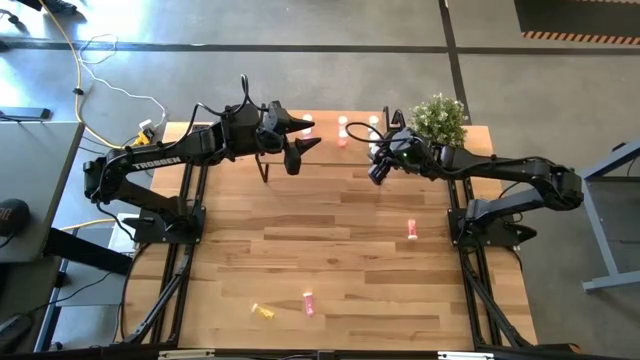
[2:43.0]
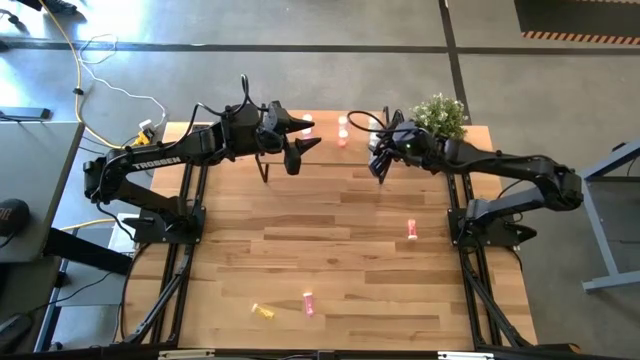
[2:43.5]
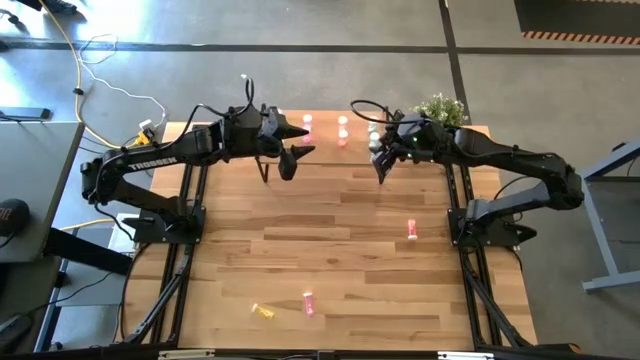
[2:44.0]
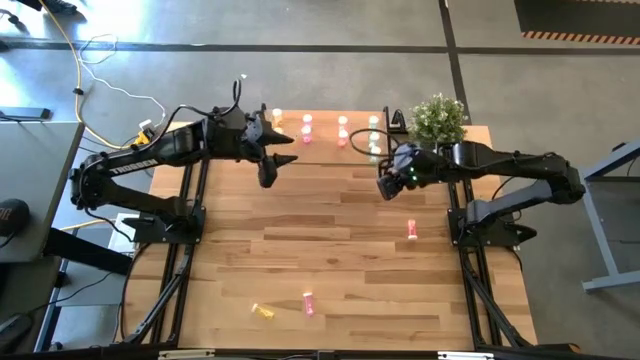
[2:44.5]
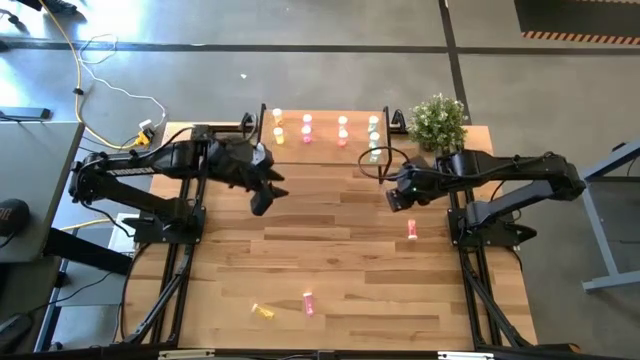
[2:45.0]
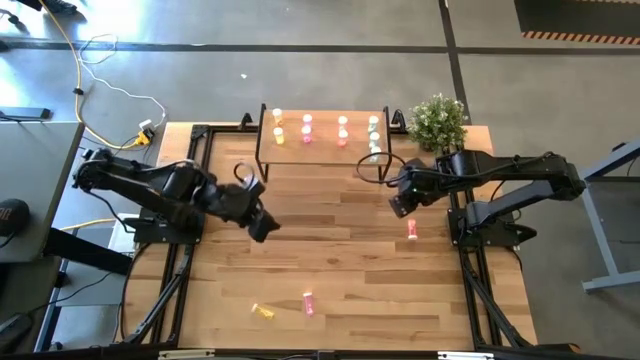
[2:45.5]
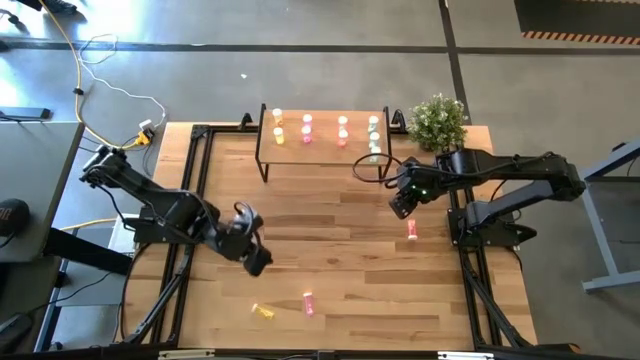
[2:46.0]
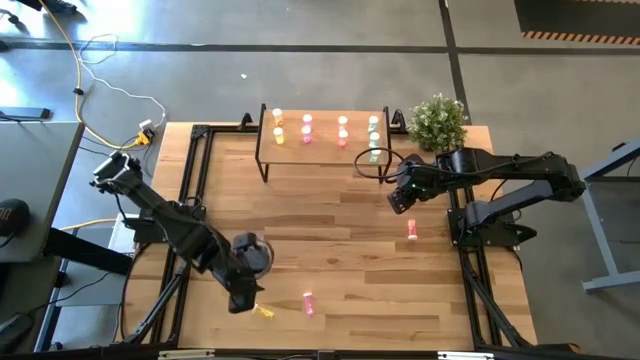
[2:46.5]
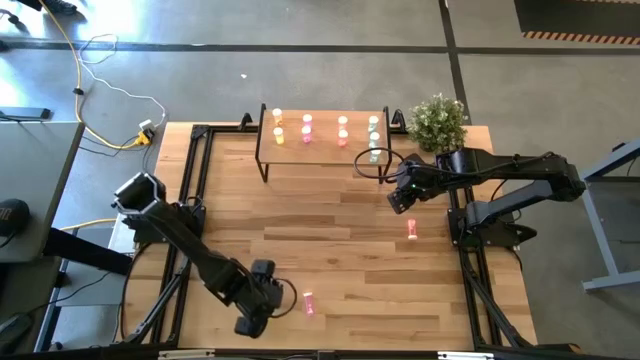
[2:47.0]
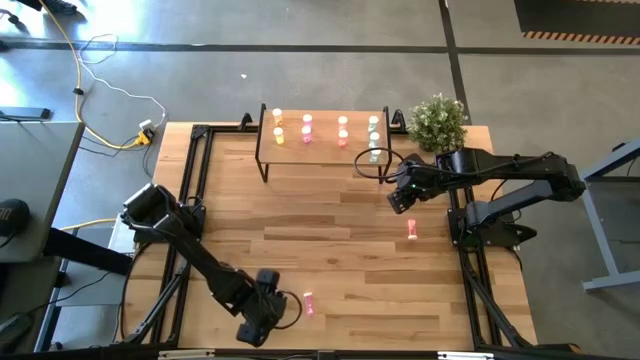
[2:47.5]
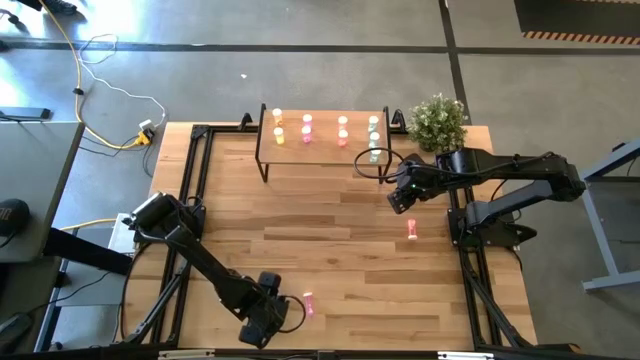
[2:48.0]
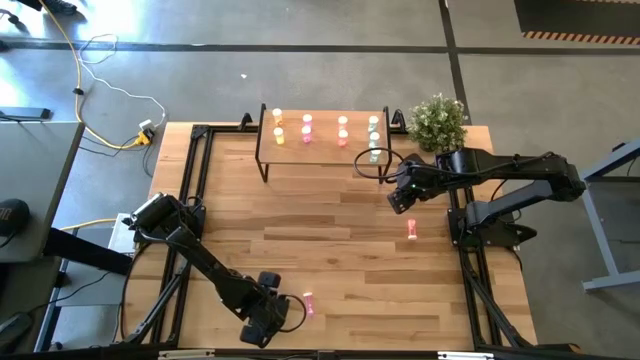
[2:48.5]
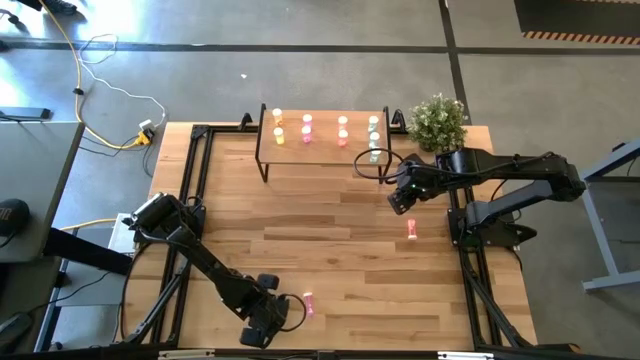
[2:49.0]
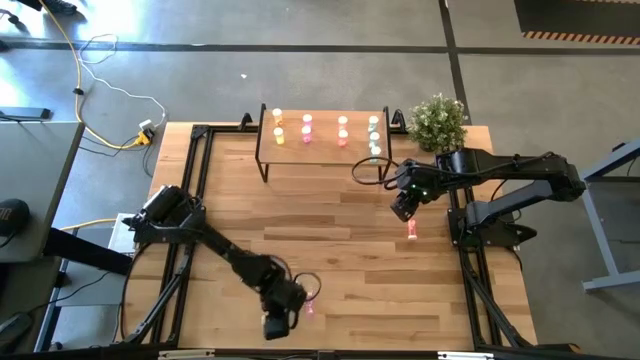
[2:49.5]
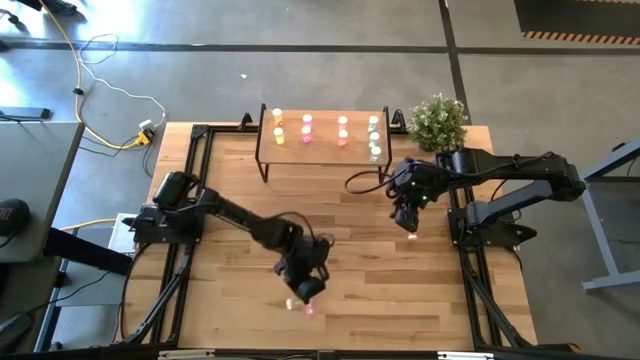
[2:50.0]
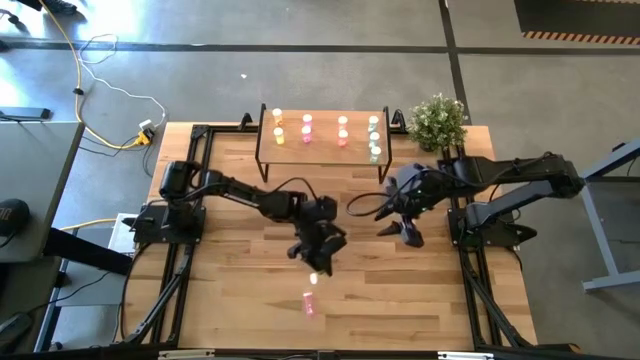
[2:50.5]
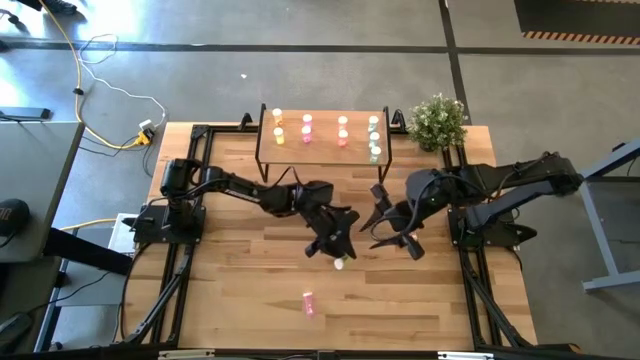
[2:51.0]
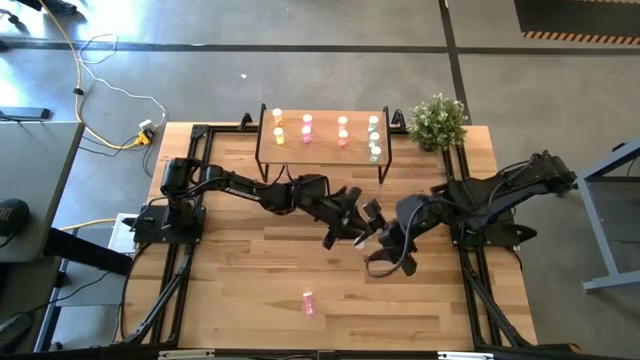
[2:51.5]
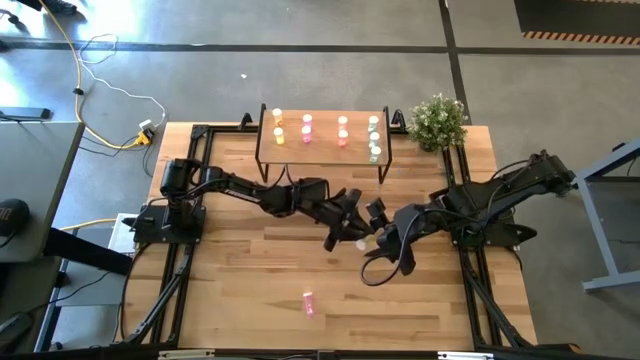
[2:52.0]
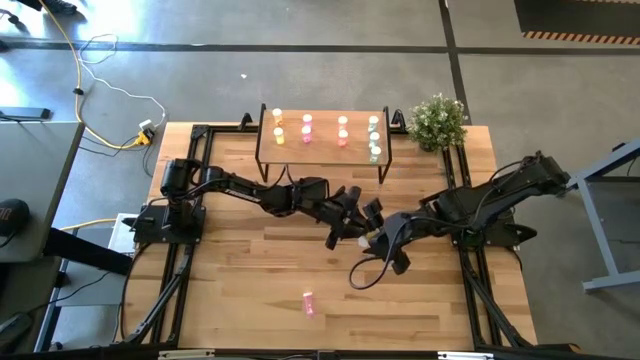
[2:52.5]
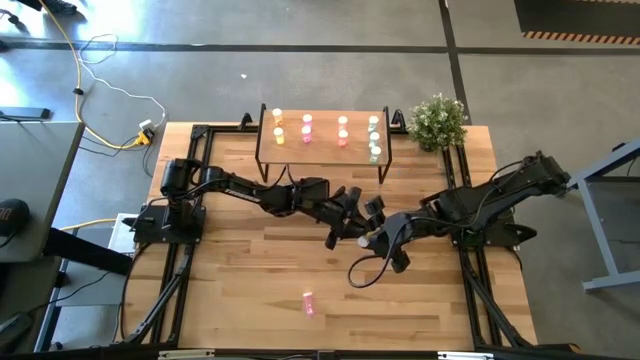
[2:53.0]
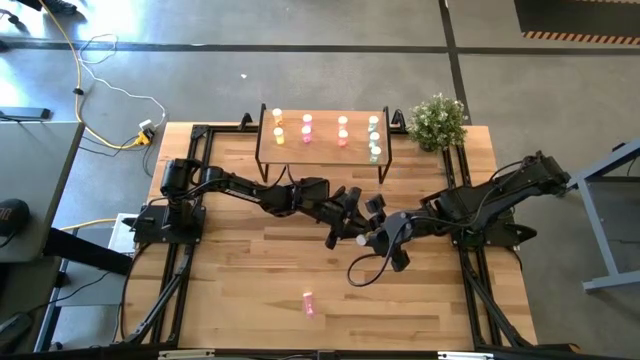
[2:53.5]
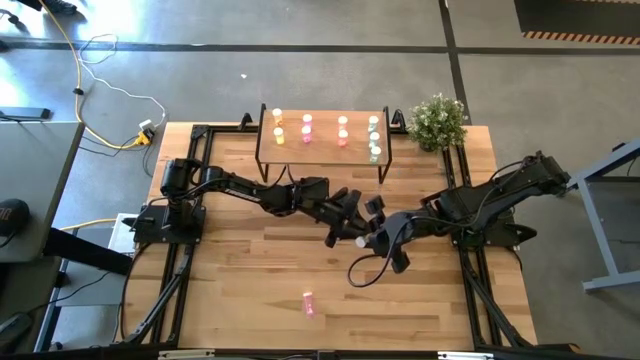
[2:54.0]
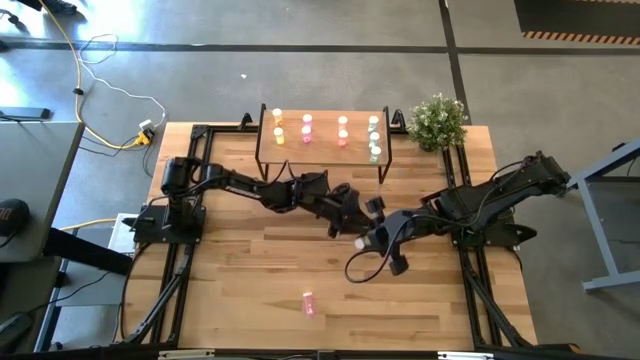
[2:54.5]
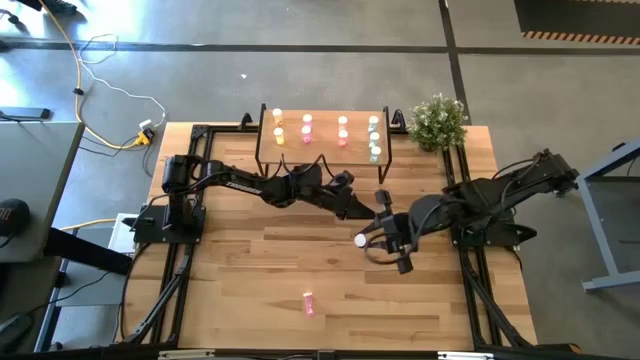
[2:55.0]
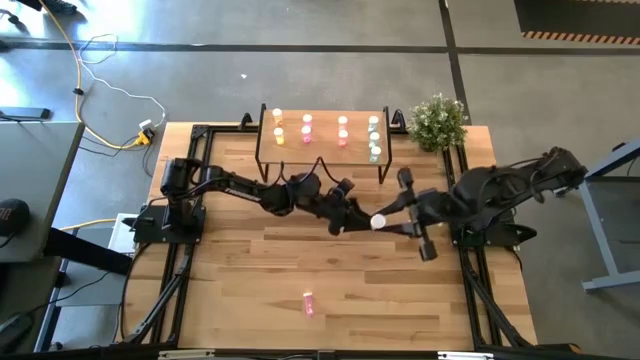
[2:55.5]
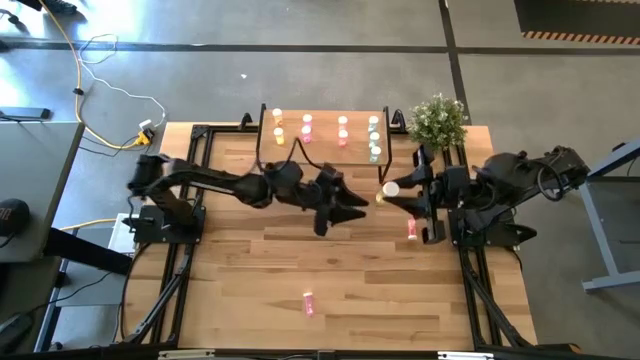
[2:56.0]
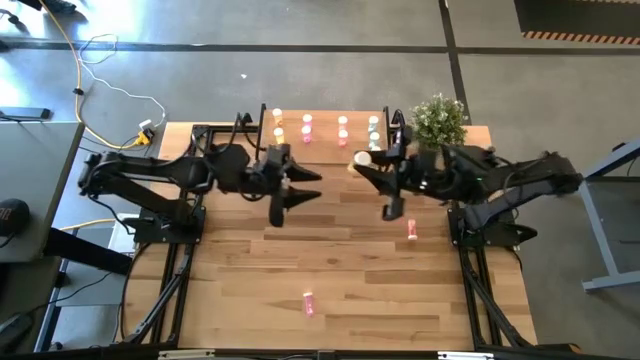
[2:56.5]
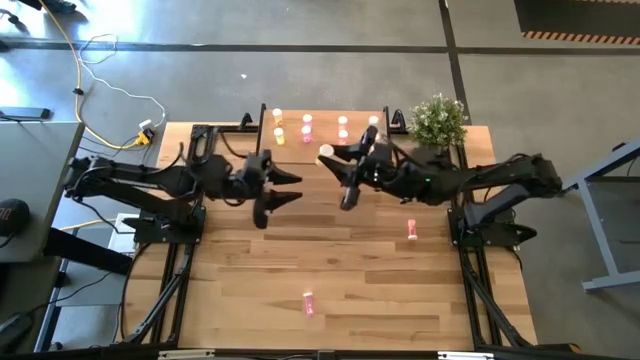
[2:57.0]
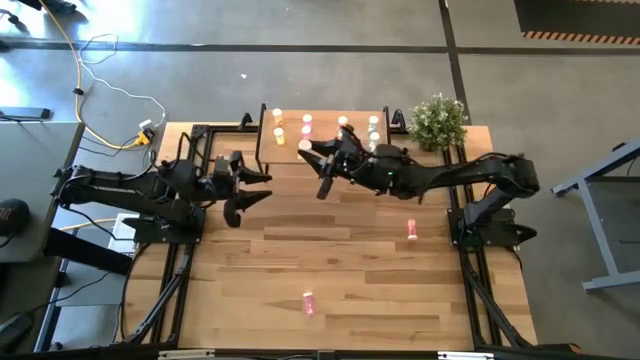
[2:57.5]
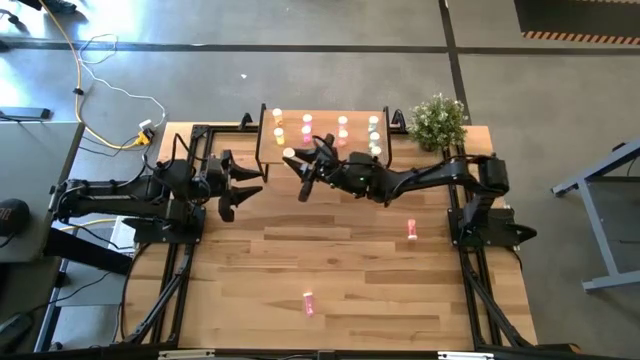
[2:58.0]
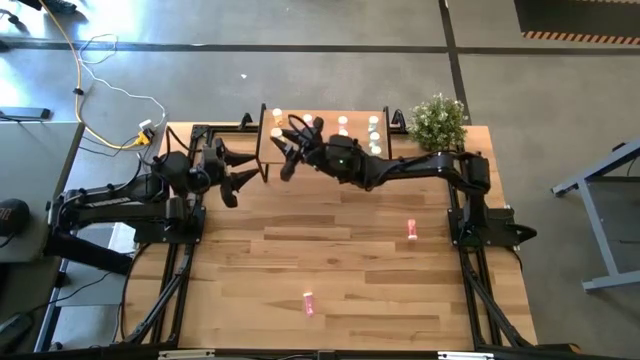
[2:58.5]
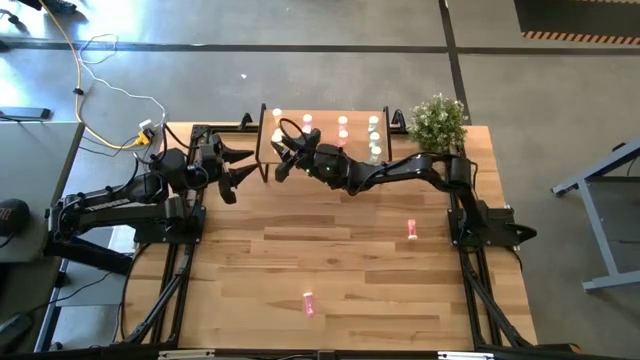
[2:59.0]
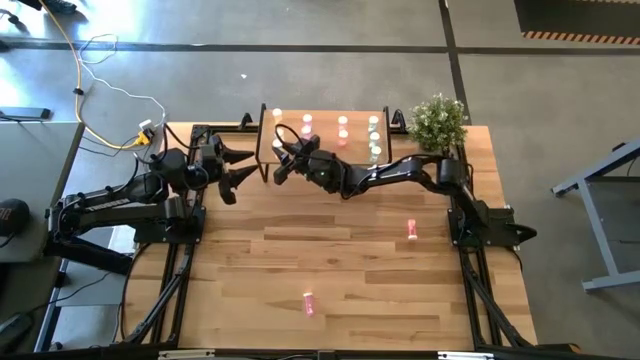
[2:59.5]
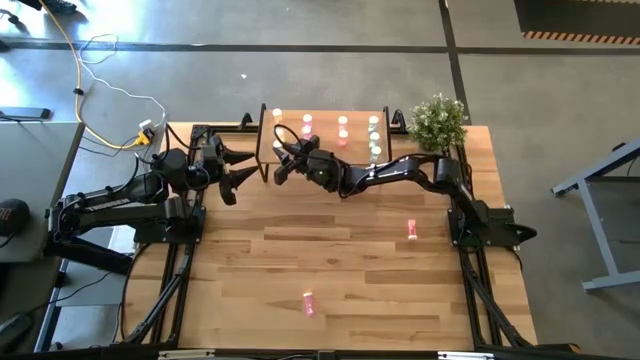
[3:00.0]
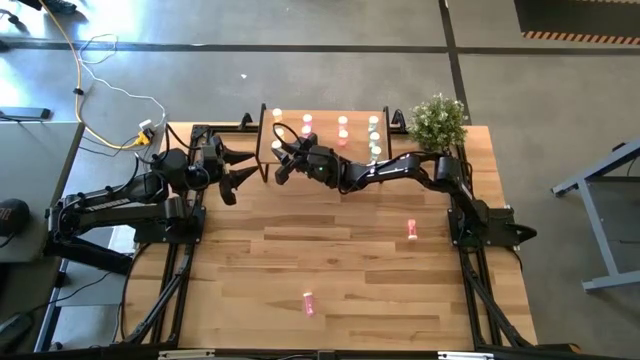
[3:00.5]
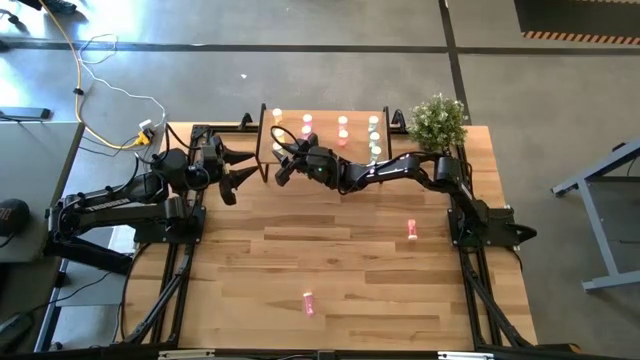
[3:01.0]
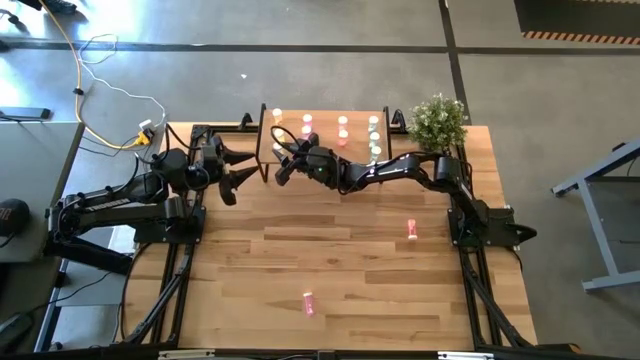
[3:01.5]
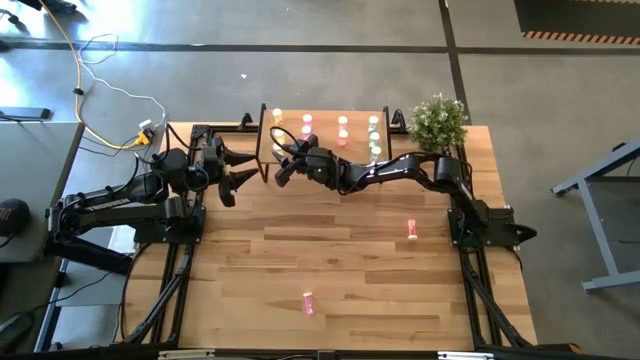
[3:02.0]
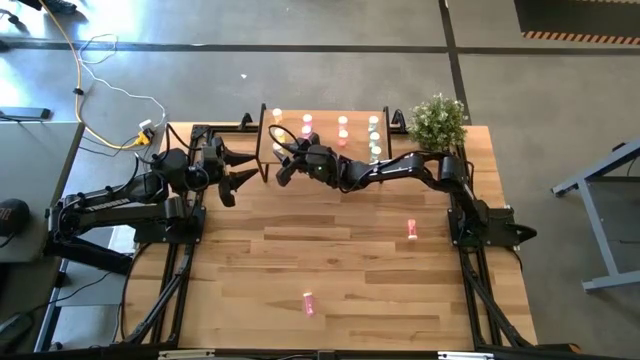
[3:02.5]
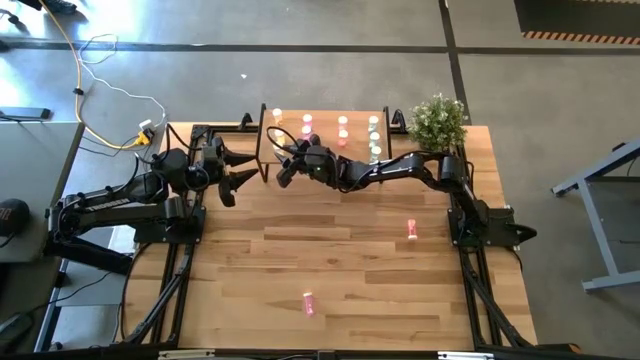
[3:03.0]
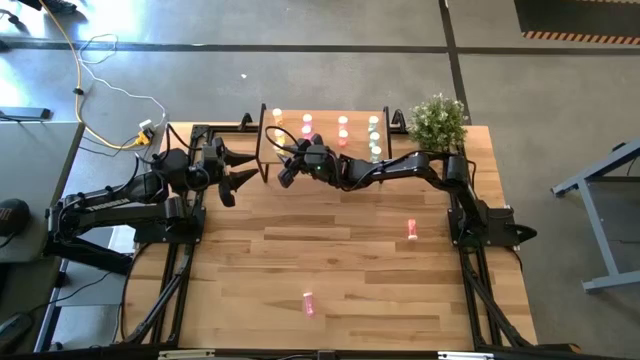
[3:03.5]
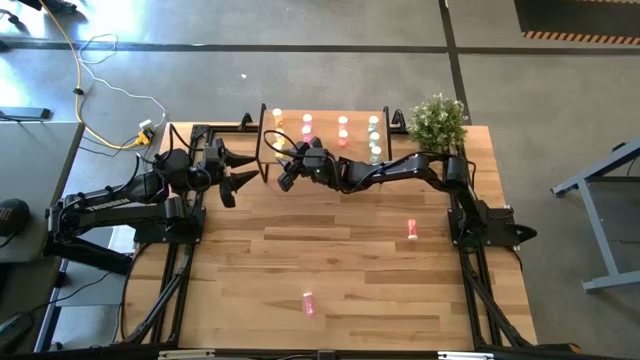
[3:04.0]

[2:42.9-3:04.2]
Task: Pick and place medicine bottles onto shelf by color
Put the yellow pill bottle on the shelf aligned with other yellow pill bottles
